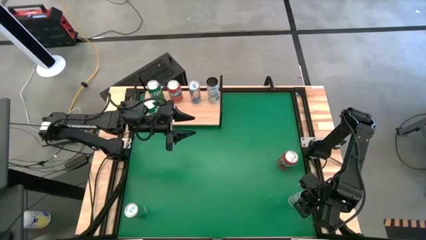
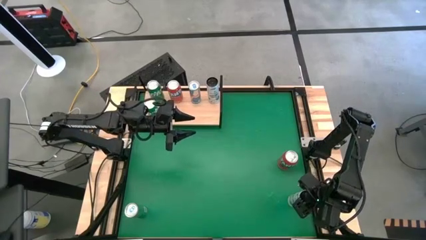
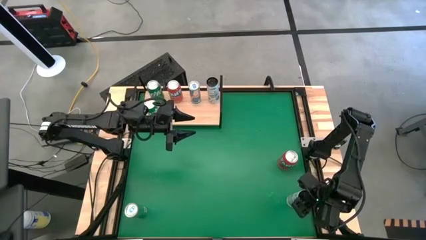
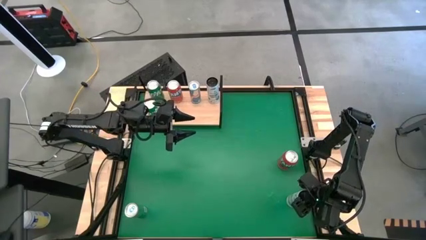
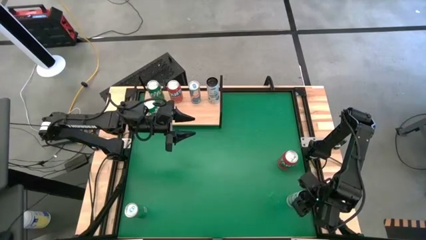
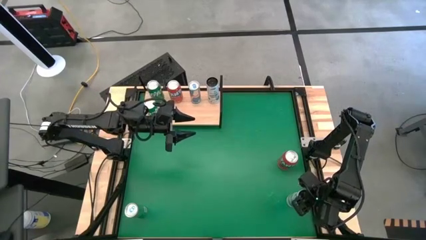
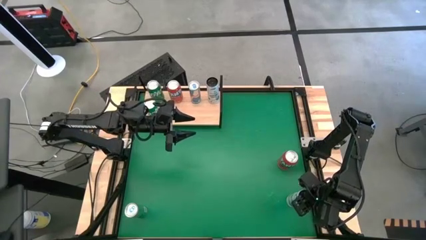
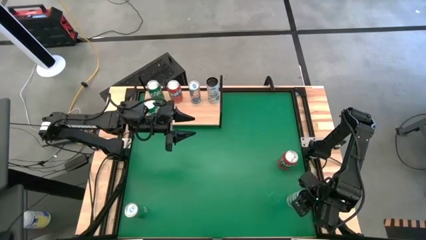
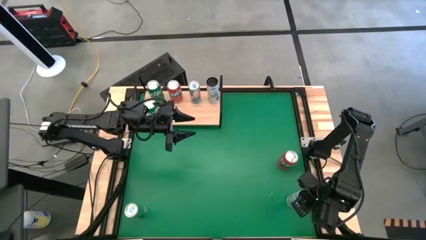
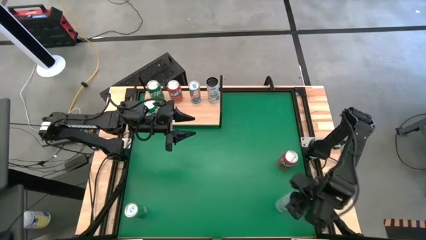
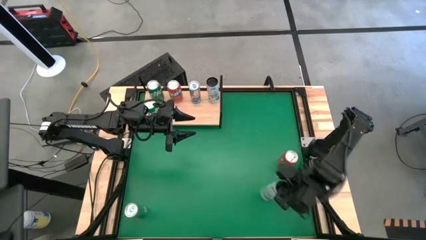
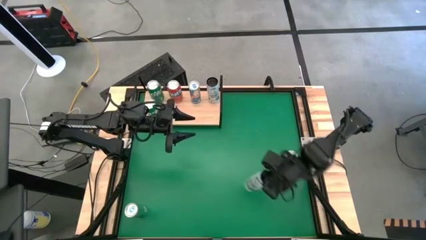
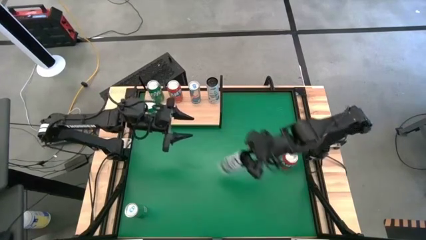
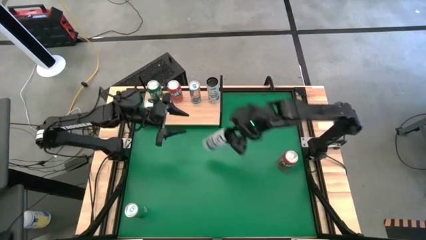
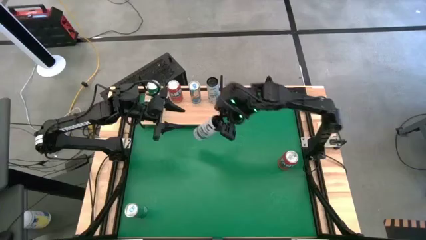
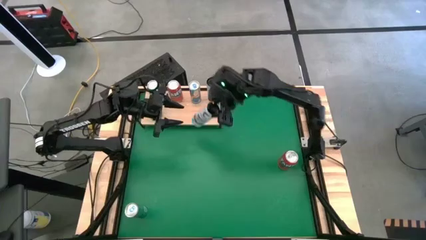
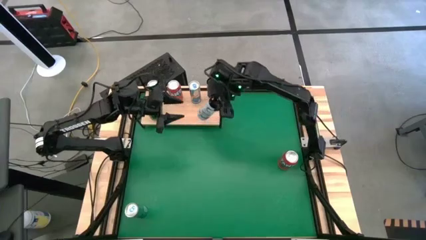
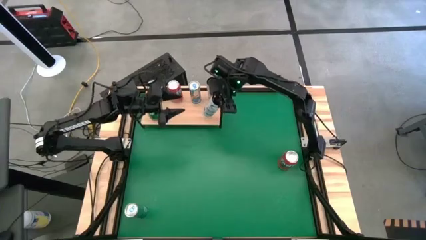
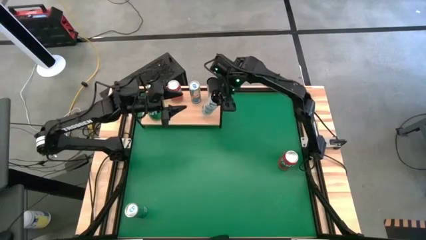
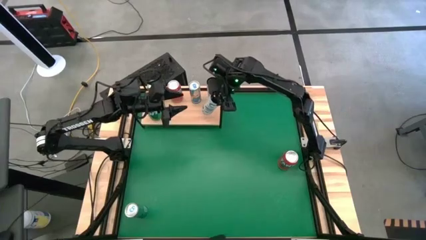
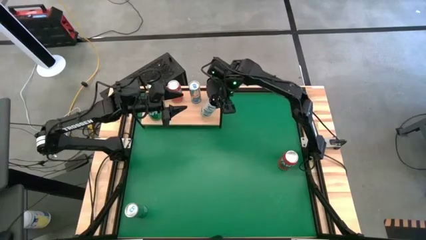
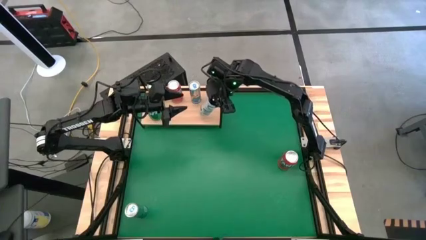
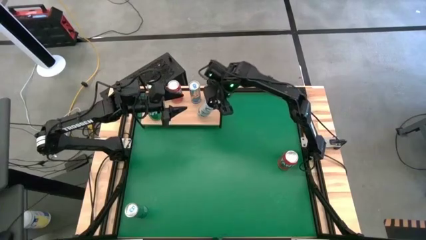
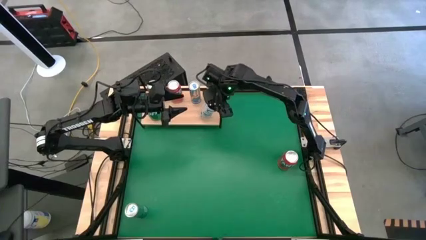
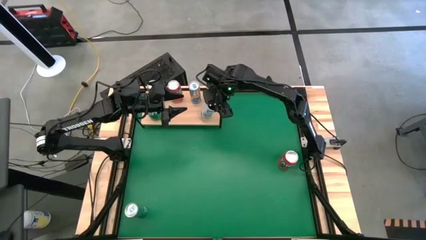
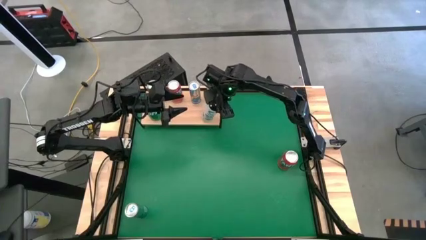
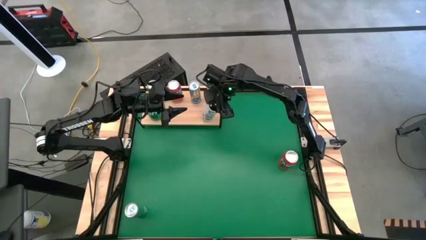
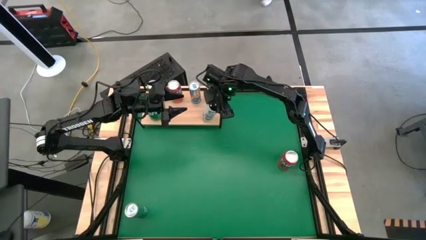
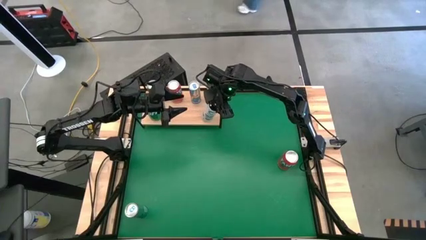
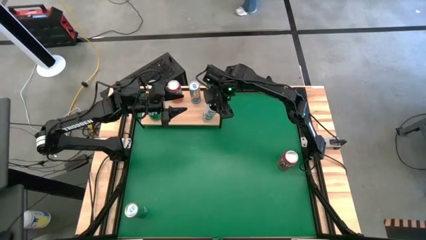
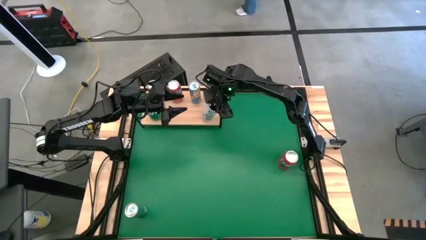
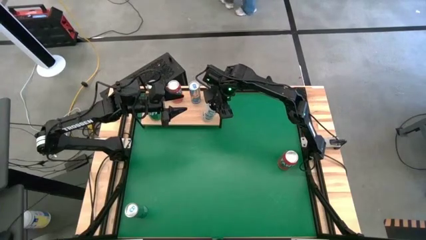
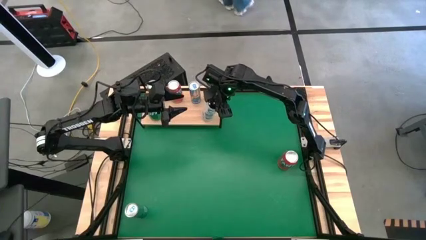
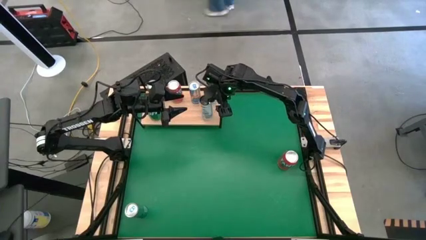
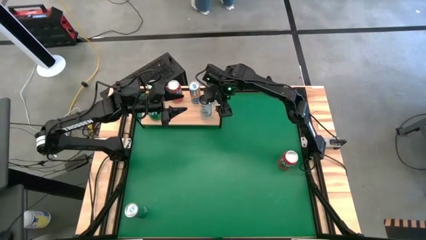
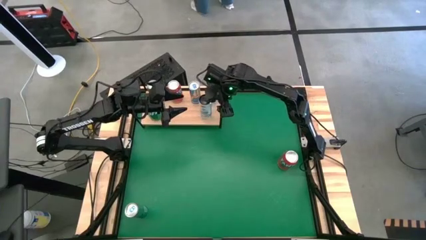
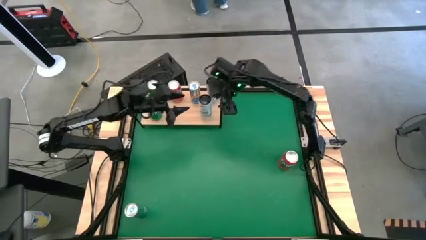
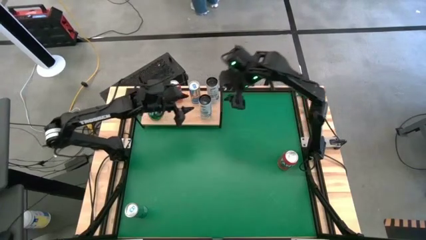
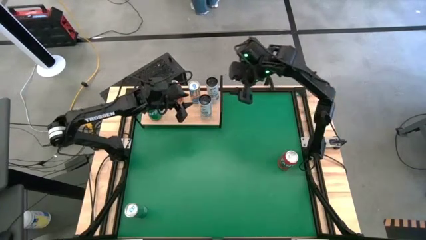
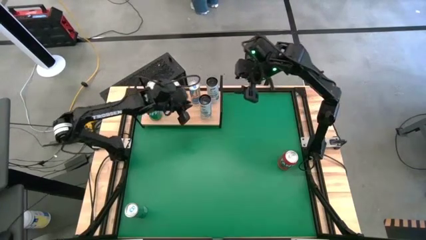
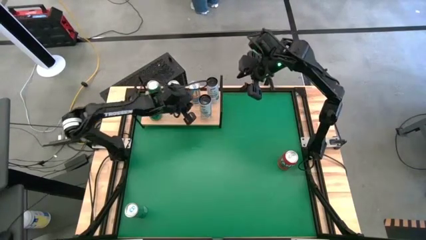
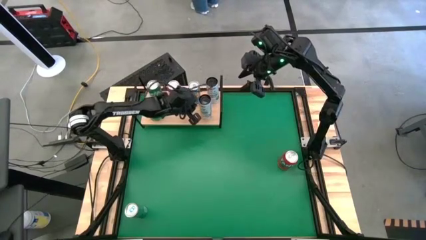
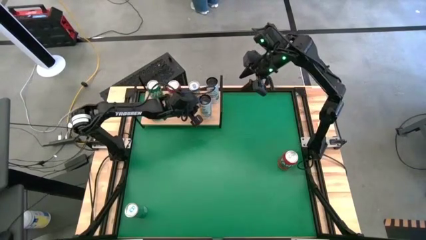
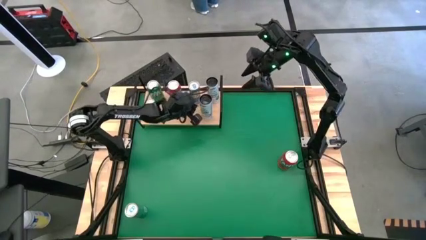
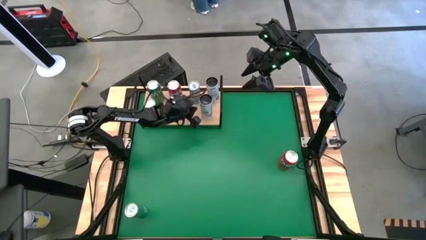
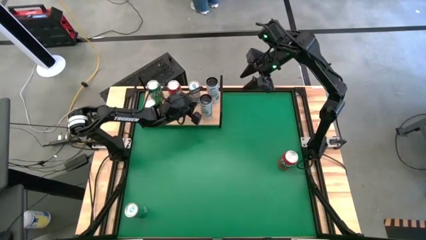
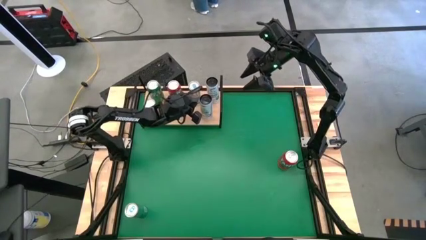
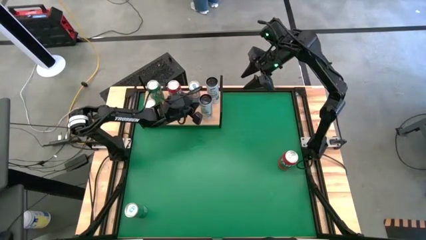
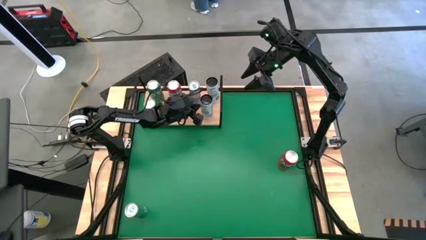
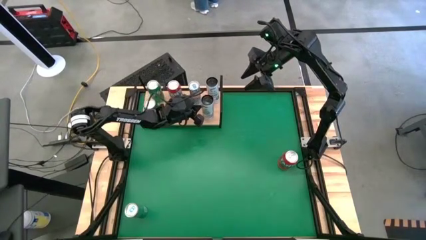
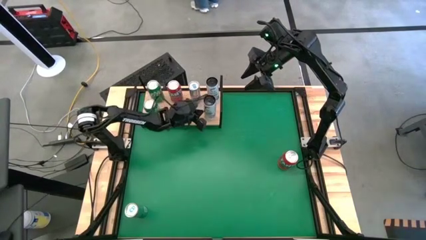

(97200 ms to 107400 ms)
Task: Place canned beverage on shelf
Put the white and blue soda can on the shelf aligned with the other white and blue soda can

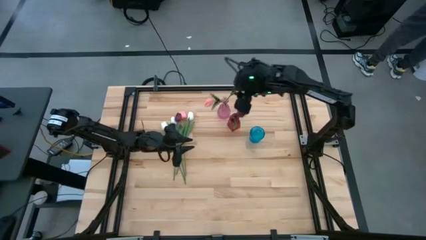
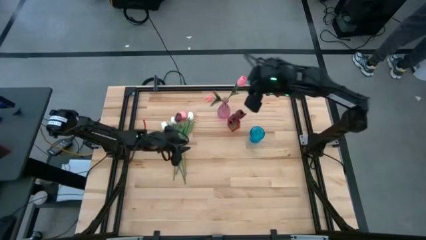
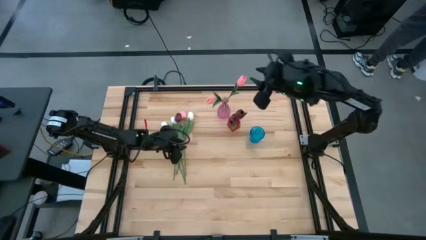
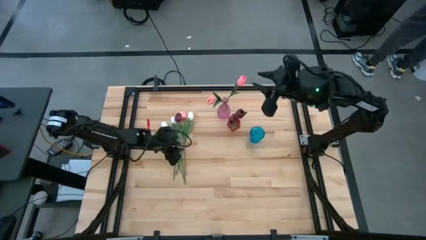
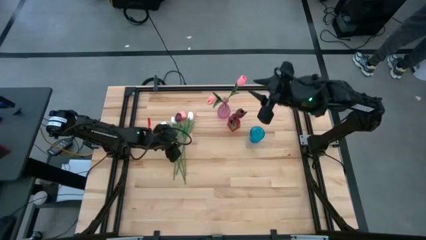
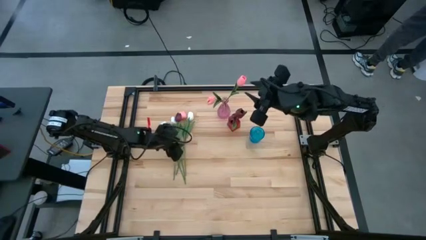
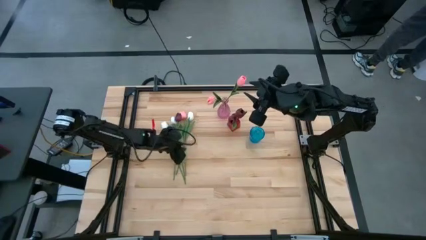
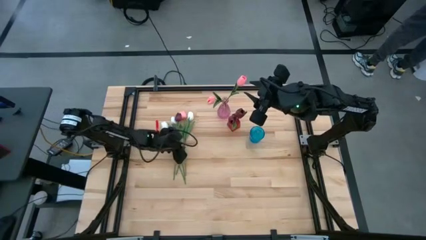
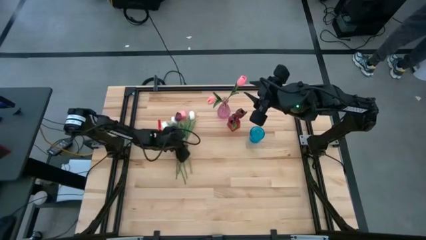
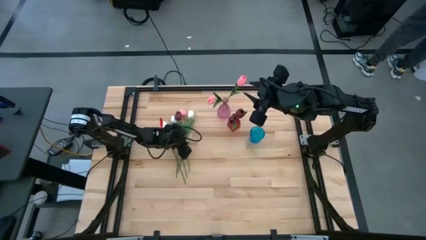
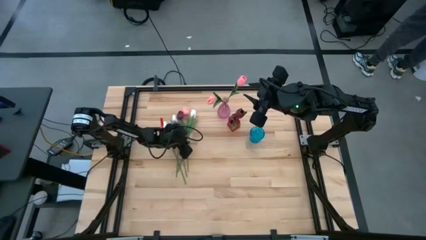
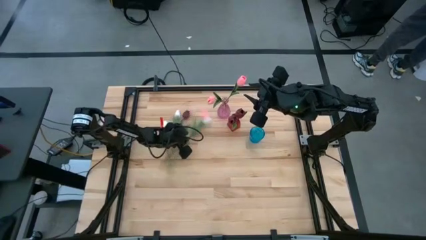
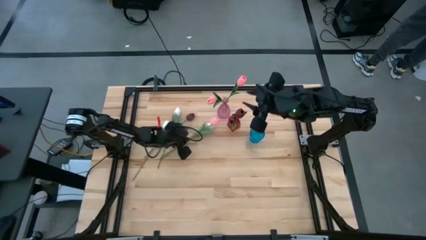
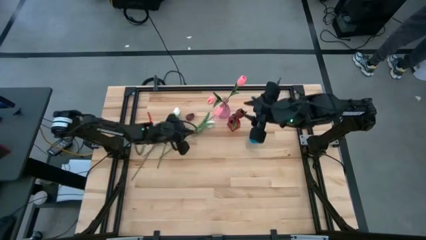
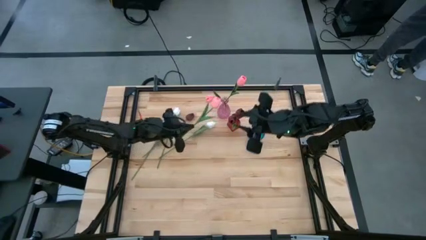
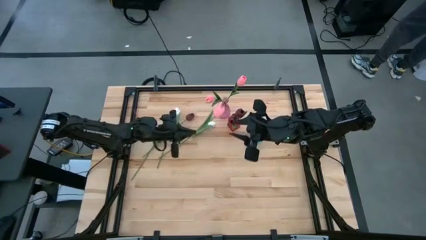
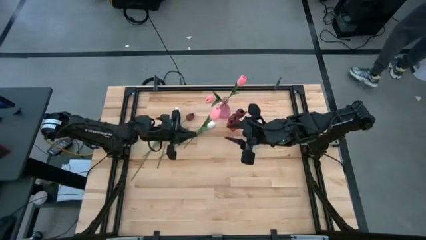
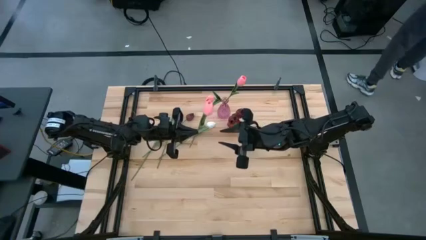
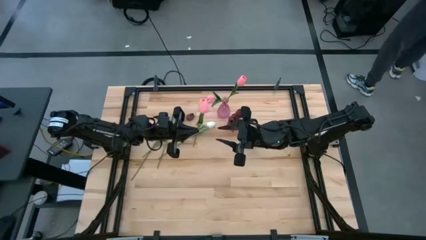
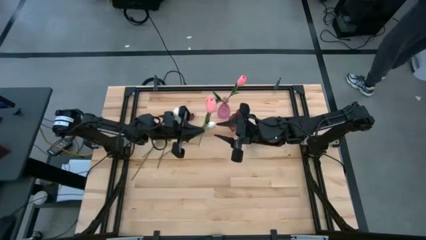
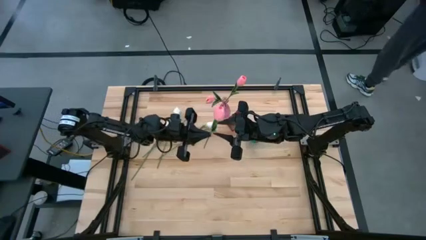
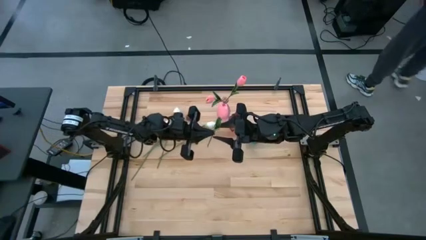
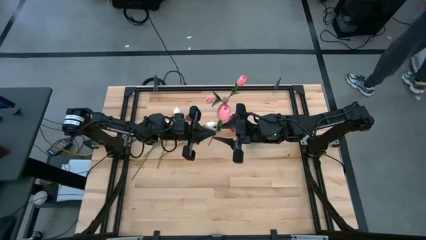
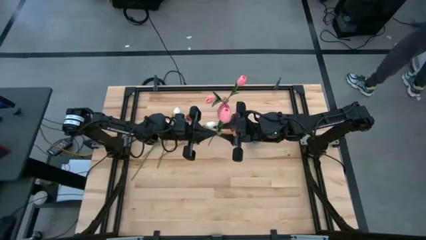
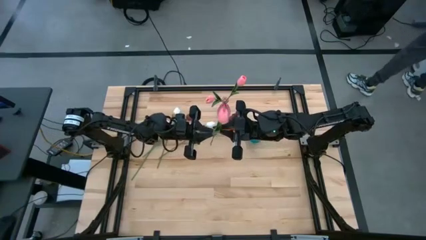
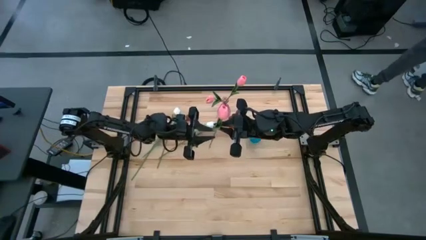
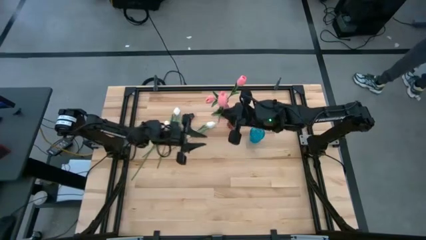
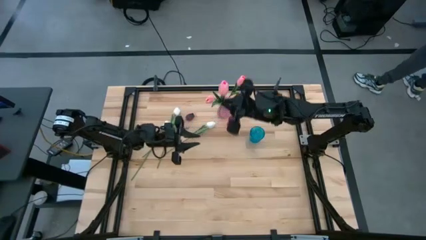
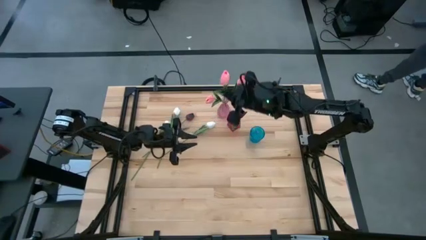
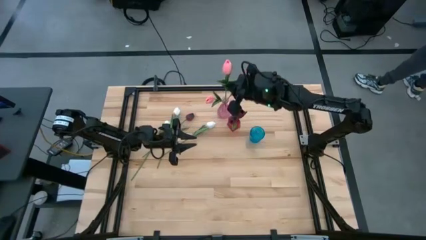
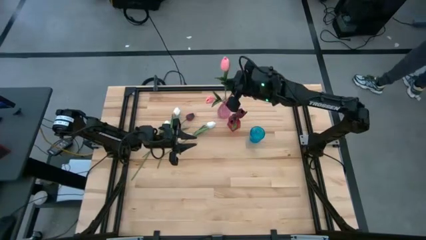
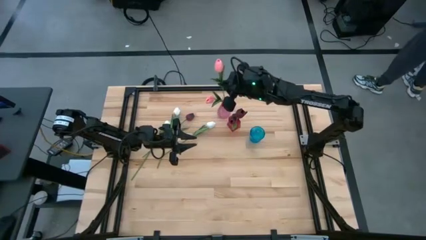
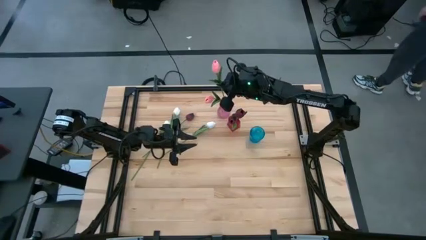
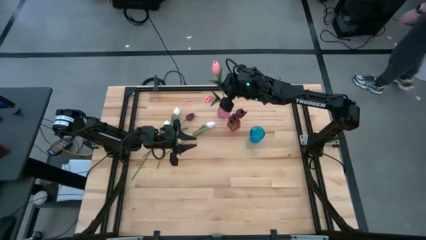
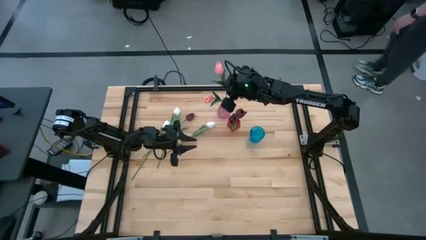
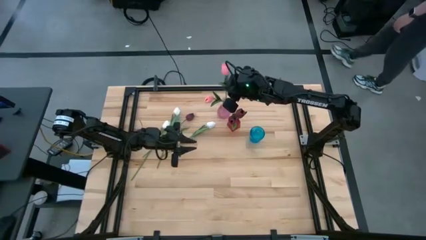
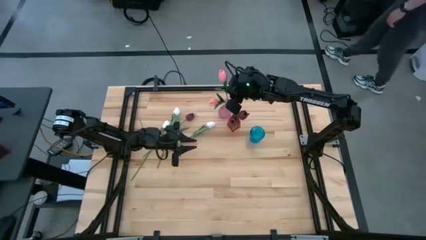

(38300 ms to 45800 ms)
Task: Sort flowers into vase by color
Put the pink flower into the pink vase
